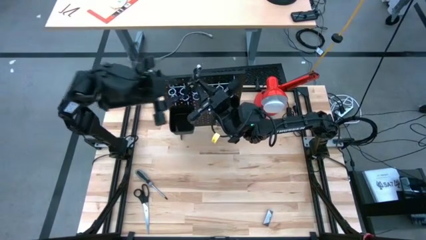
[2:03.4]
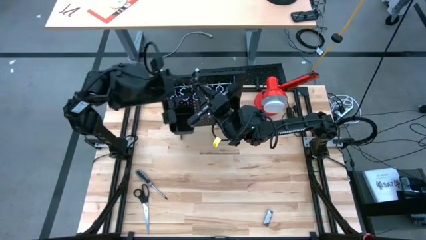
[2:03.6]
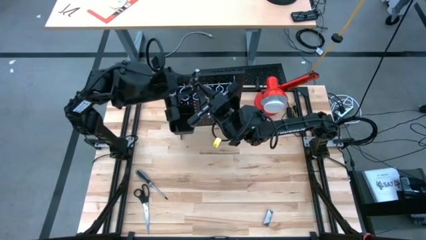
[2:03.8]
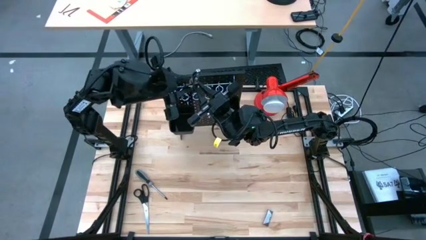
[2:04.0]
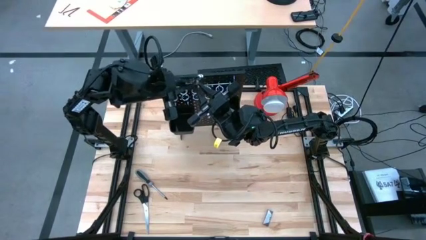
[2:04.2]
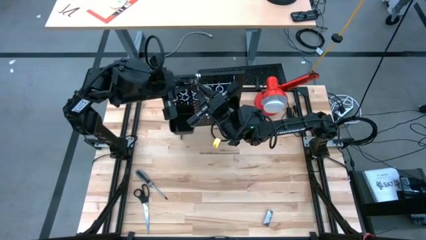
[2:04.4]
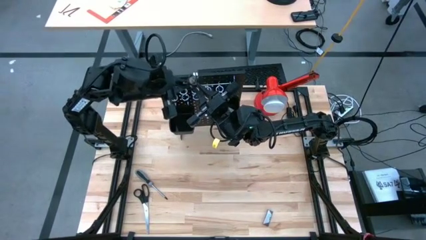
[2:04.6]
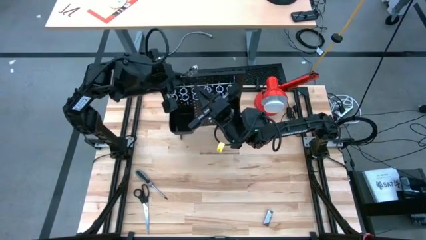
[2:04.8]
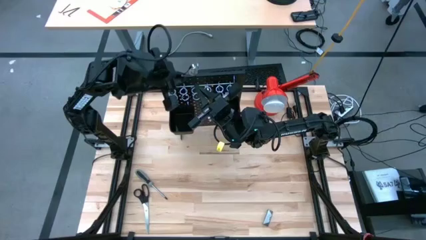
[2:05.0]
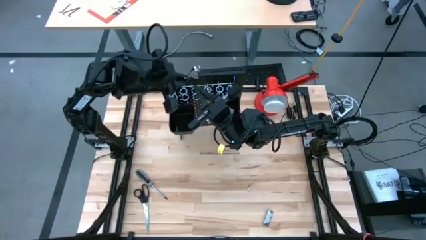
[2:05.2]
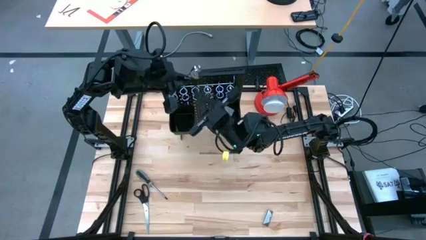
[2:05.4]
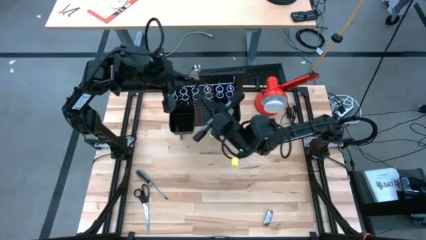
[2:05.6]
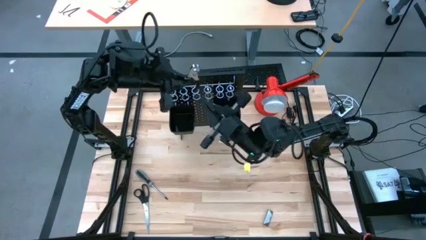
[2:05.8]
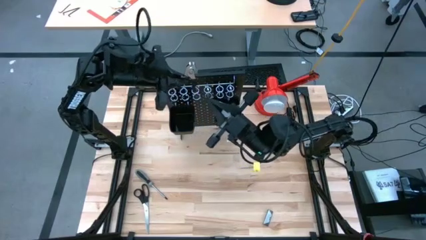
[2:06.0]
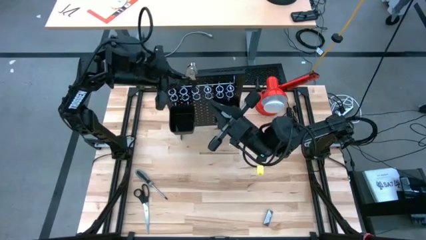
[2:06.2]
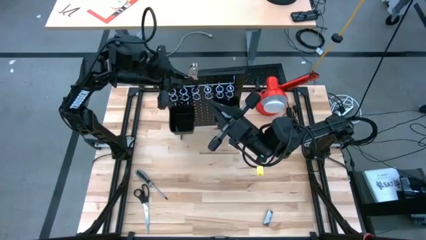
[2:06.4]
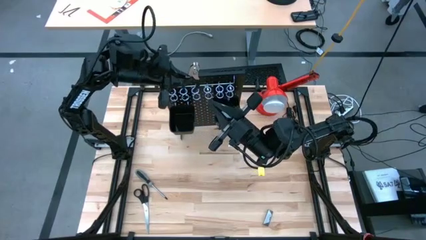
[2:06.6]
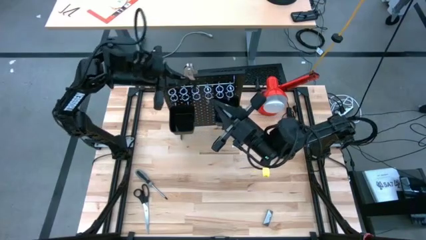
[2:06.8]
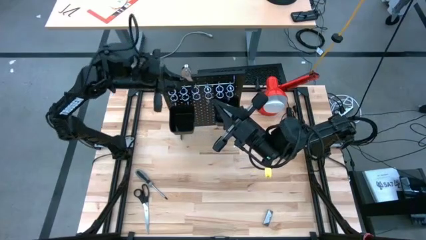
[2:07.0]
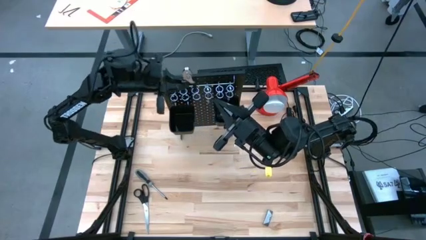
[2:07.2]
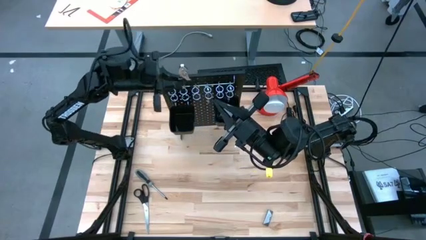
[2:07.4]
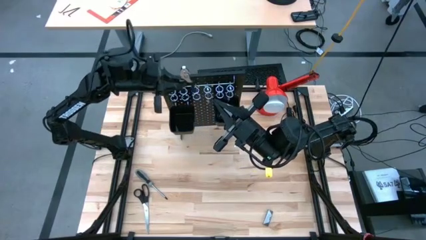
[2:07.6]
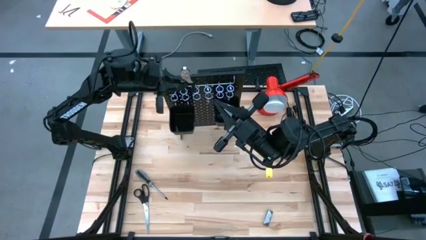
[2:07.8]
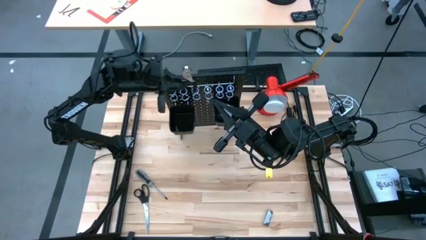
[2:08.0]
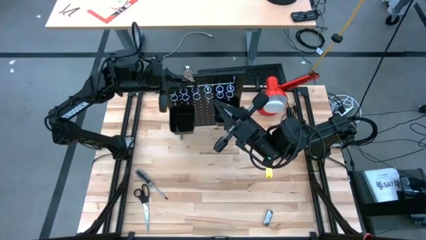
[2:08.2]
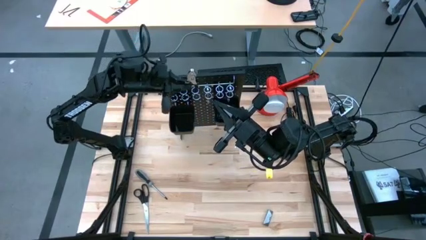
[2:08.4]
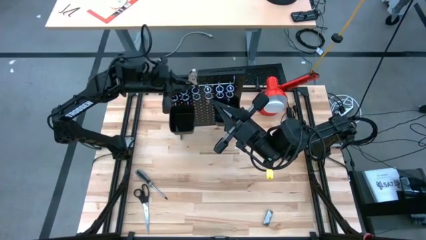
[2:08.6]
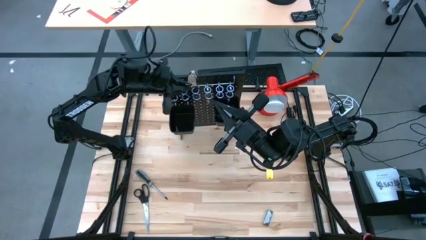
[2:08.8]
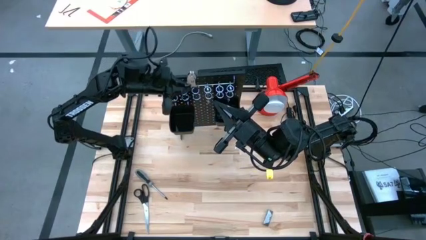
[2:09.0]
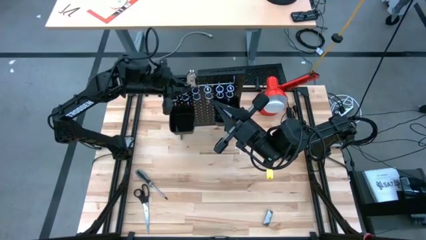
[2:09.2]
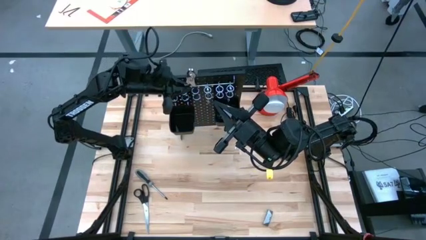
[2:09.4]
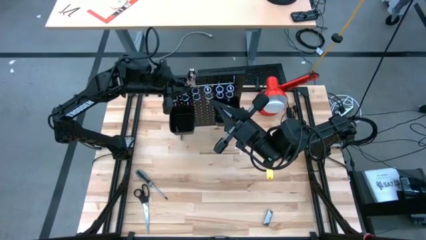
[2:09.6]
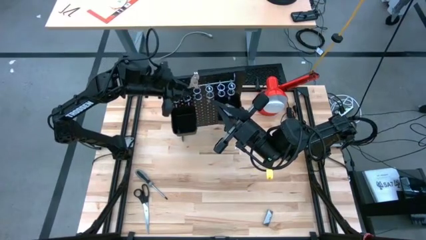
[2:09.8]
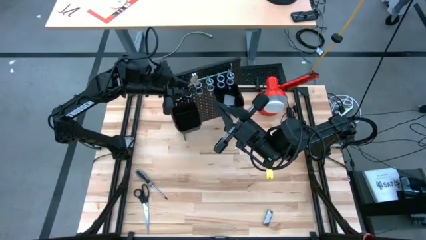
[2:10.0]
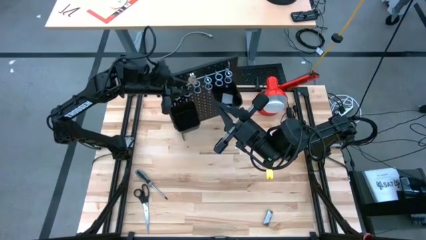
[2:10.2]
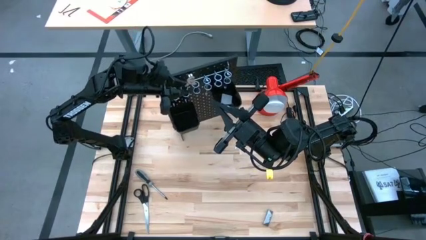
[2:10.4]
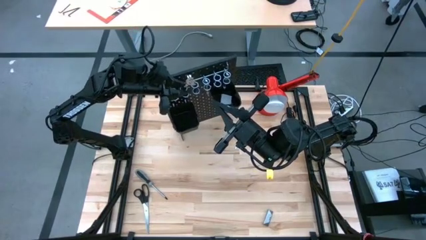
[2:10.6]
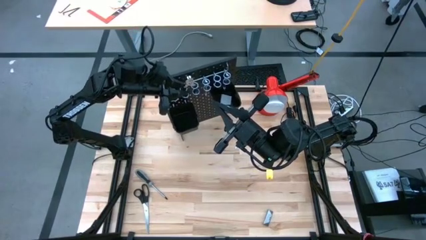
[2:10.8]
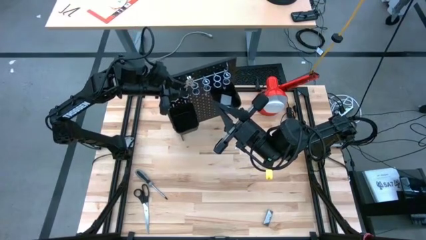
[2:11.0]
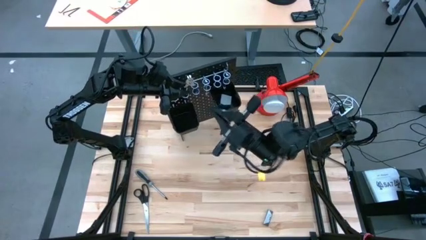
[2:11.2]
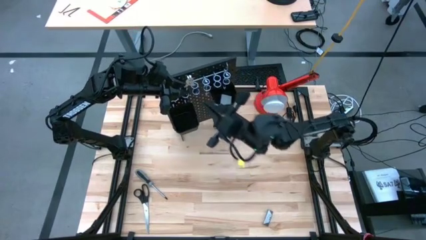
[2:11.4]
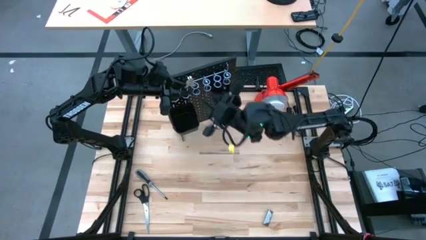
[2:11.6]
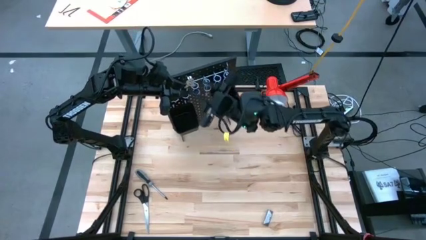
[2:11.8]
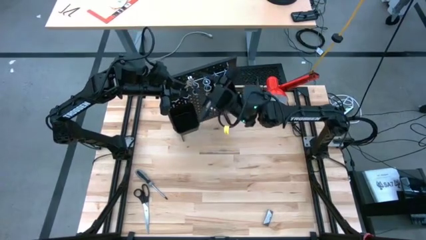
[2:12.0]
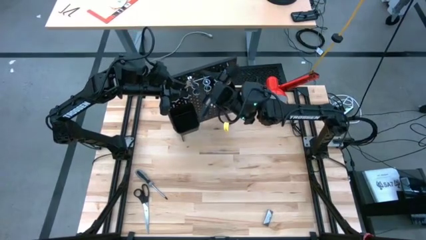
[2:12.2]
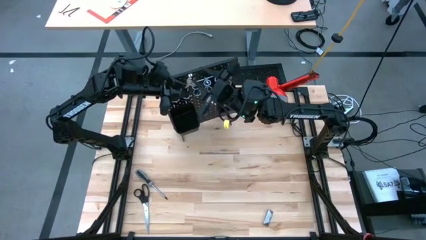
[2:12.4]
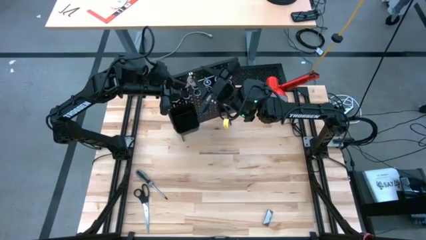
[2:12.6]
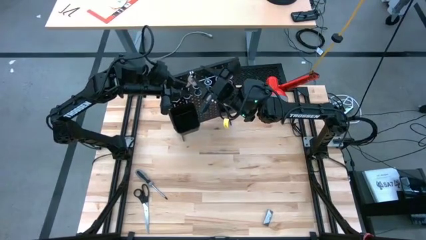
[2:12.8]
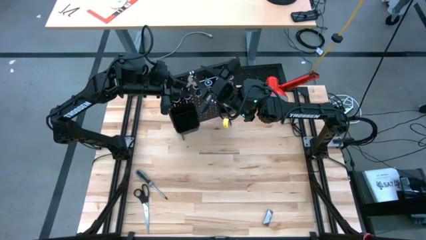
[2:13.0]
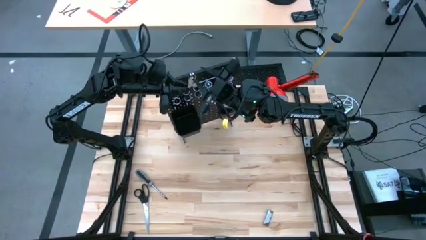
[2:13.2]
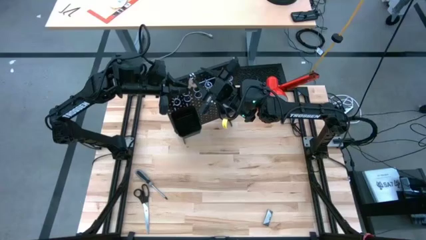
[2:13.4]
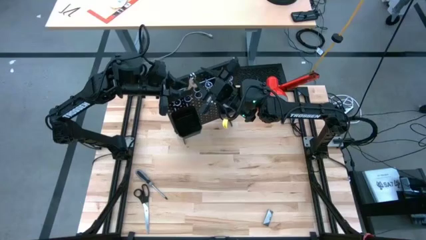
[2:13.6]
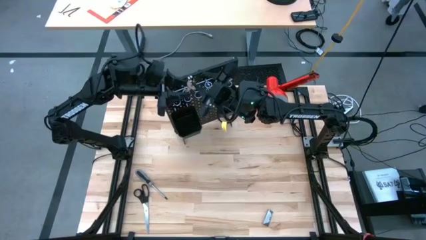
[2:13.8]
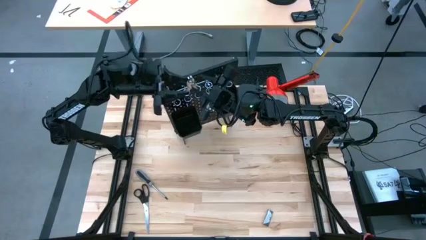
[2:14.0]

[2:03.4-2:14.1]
Task: Hang tools onto peg board
Hang the pliers on the pegboard

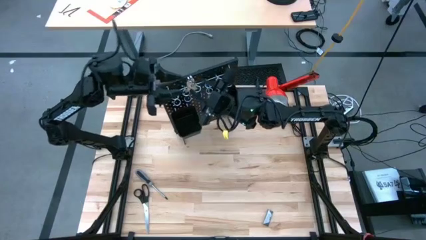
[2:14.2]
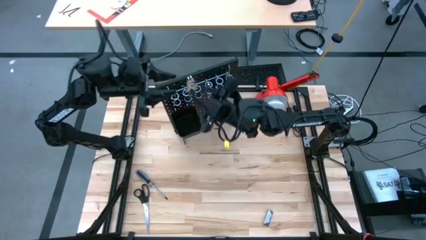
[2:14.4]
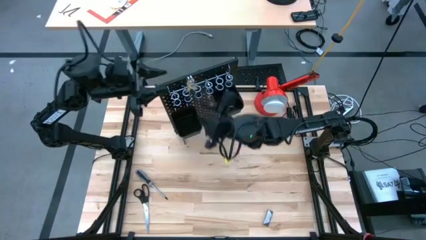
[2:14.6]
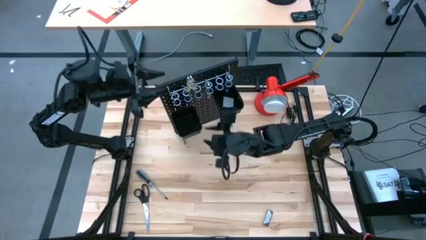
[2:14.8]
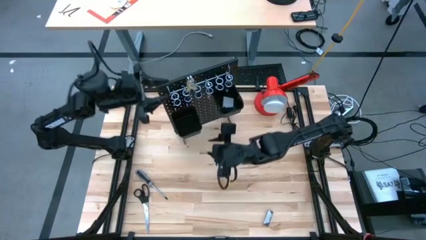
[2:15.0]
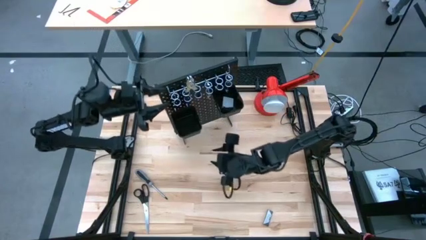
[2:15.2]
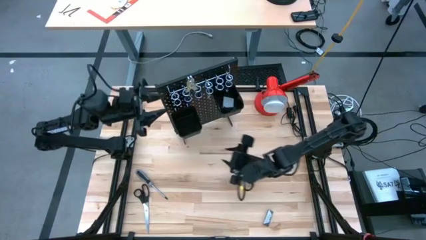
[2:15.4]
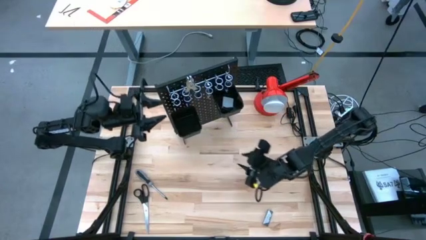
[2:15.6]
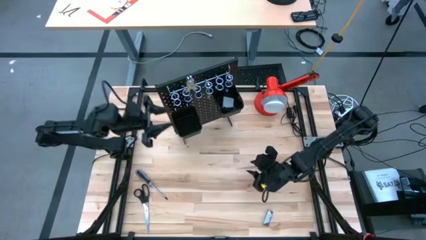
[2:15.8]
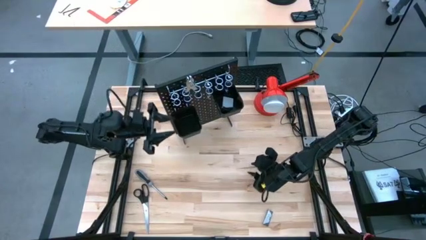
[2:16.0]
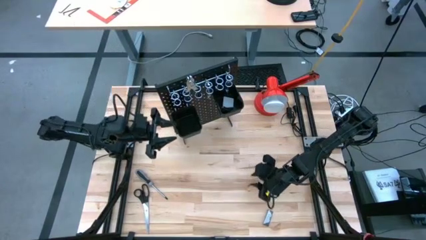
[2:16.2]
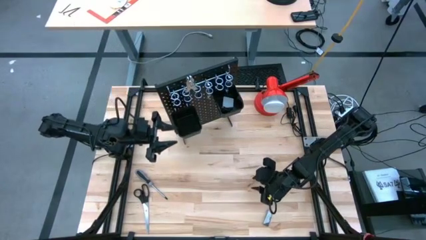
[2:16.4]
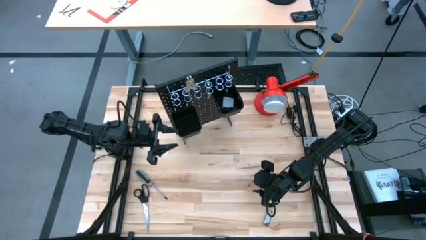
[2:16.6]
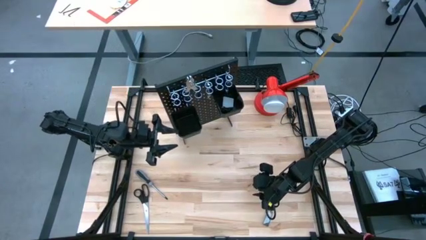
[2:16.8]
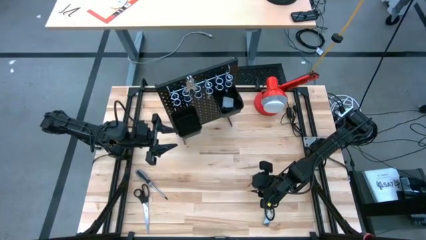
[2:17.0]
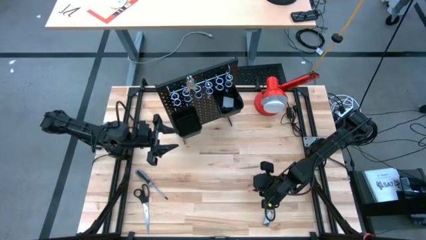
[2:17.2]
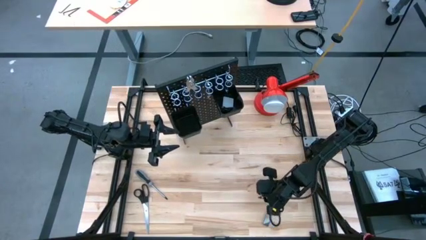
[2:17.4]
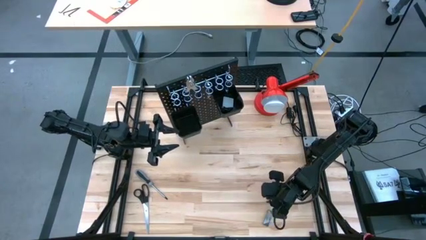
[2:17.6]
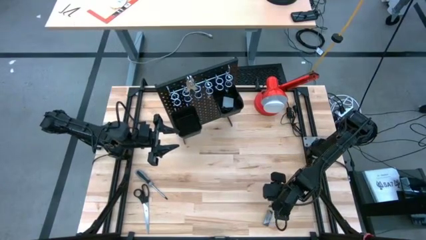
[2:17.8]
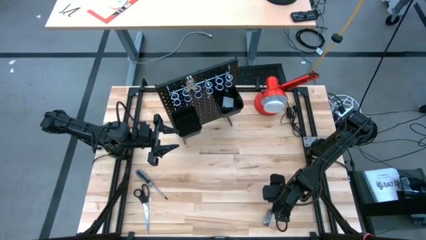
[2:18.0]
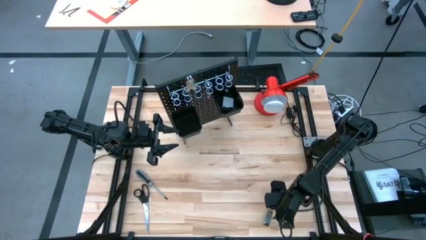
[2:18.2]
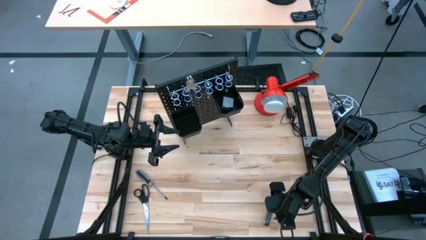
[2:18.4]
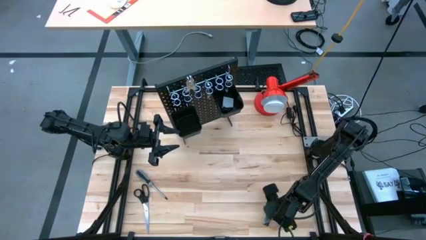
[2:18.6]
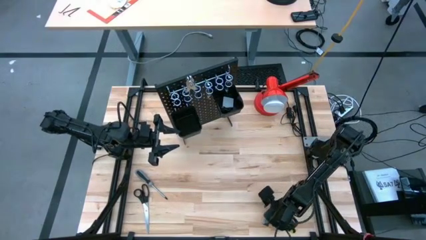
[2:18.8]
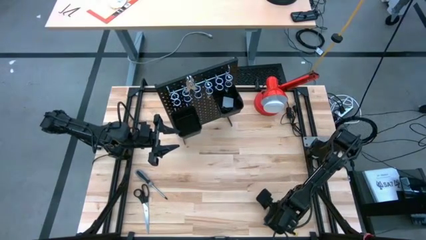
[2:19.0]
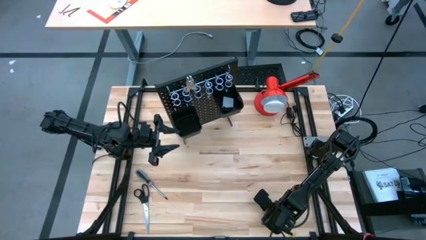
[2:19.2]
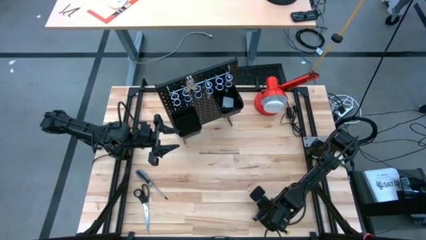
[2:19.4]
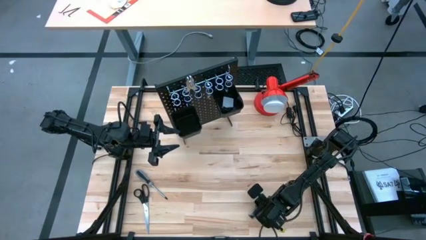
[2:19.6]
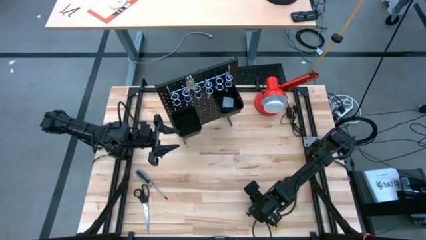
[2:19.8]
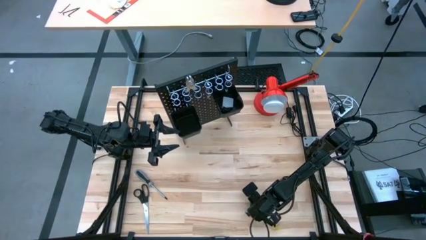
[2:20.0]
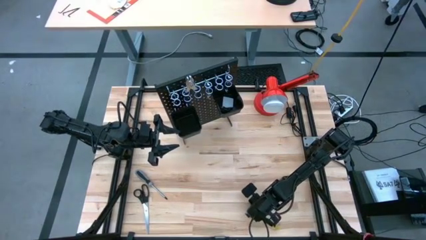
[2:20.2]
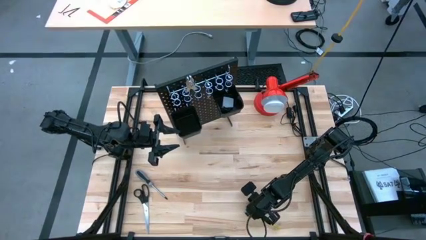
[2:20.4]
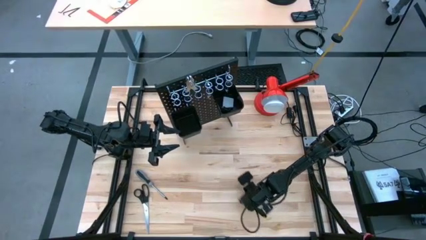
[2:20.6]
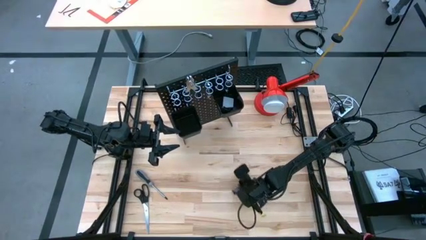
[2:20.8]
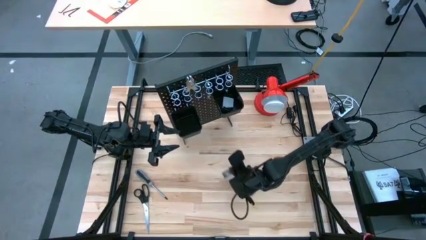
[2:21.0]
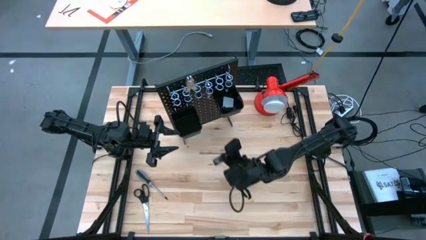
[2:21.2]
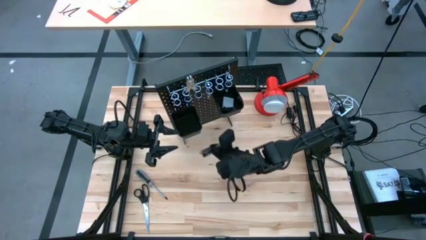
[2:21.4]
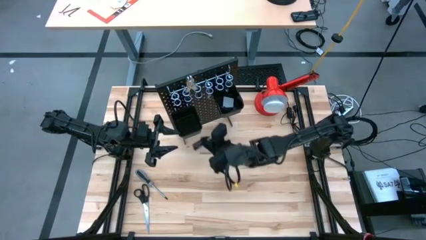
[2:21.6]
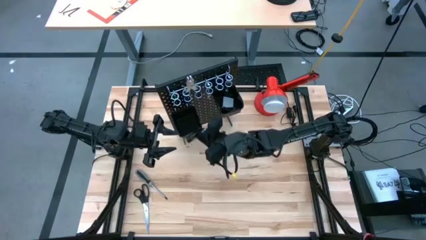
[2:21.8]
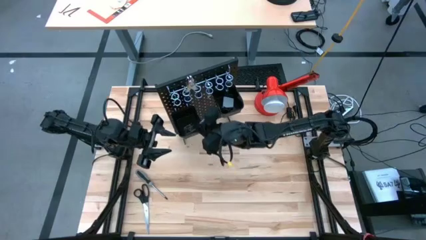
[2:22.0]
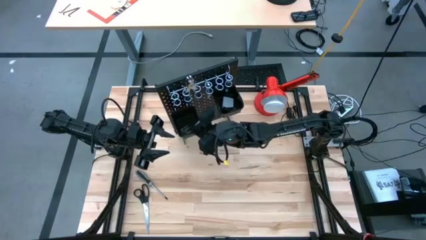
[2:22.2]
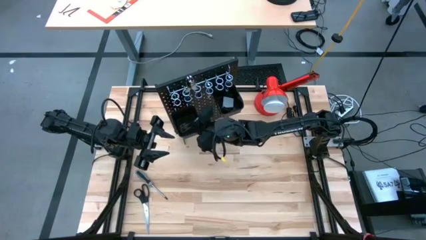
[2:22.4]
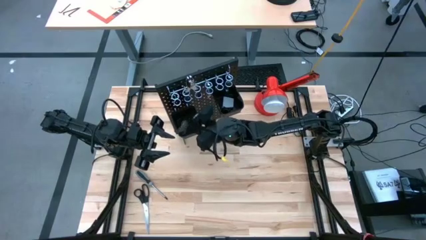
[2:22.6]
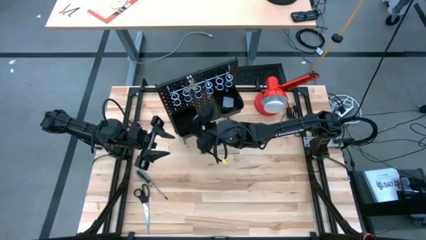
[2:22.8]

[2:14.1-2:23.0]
Put the blade dispenser into the bottom black basket on the pegboard
